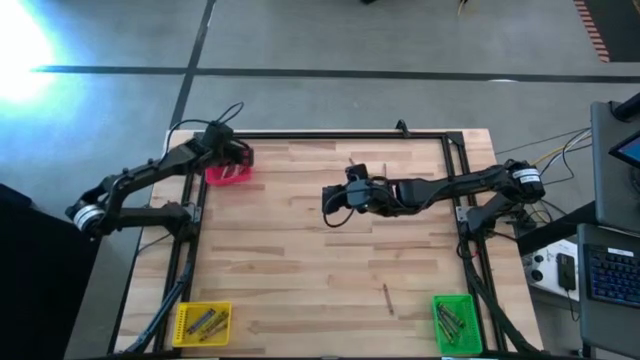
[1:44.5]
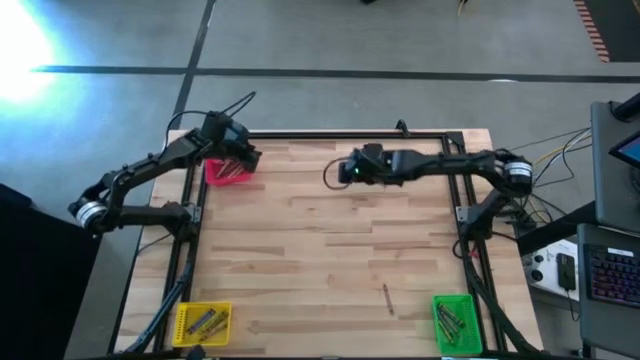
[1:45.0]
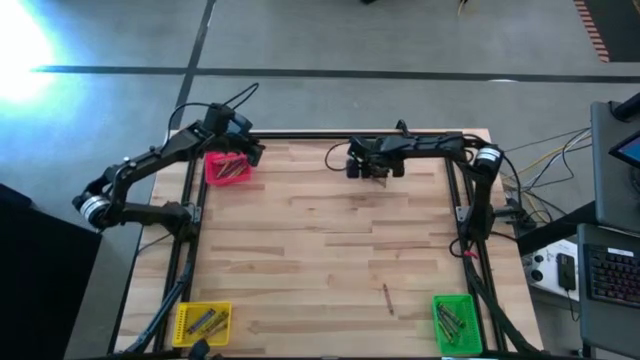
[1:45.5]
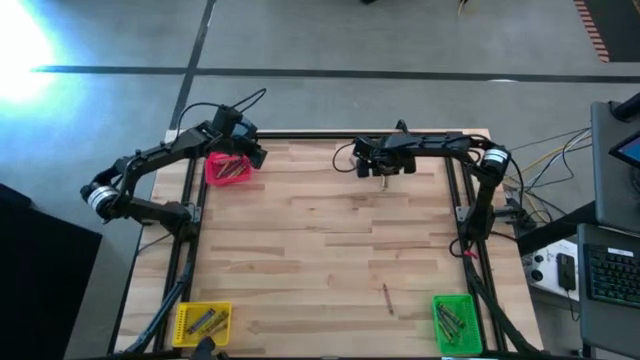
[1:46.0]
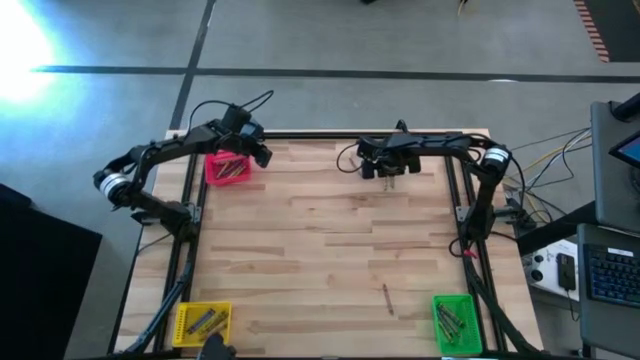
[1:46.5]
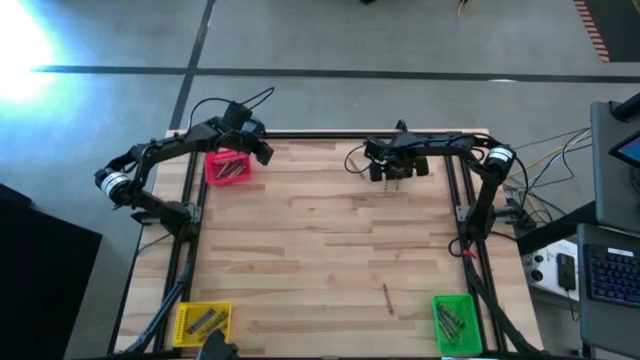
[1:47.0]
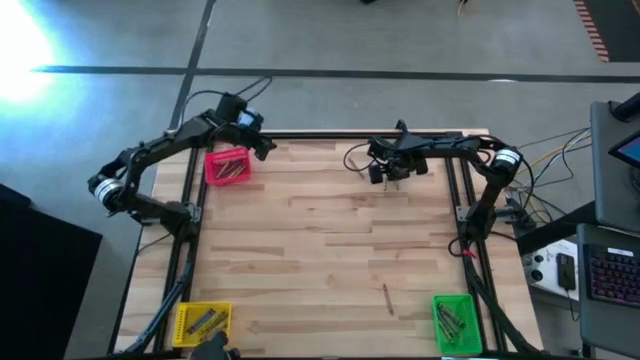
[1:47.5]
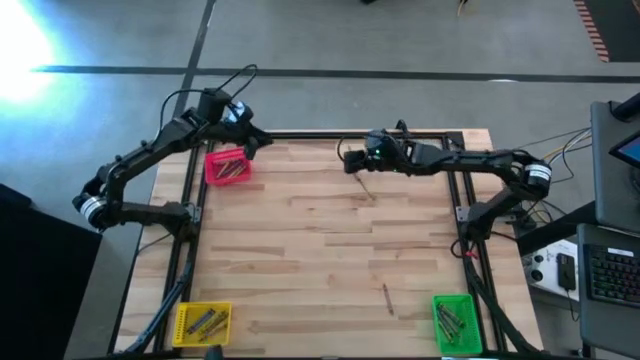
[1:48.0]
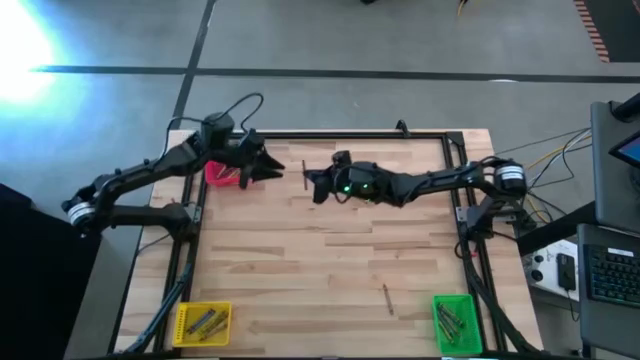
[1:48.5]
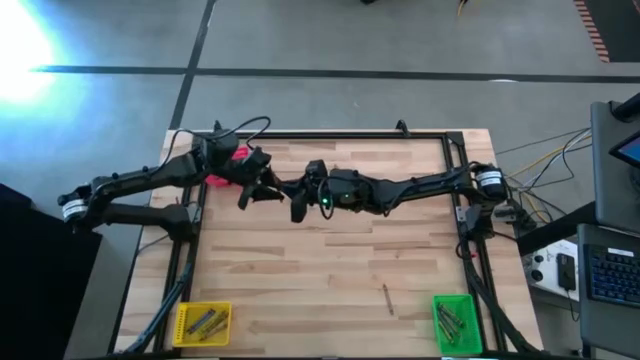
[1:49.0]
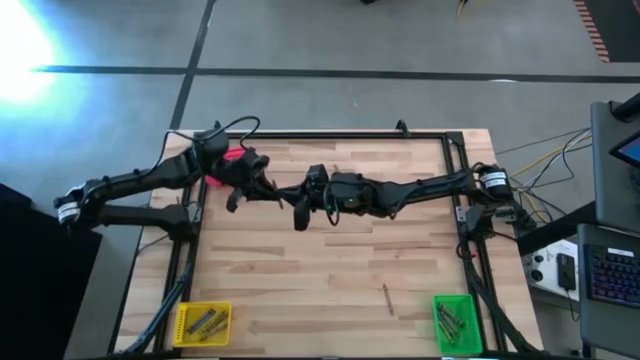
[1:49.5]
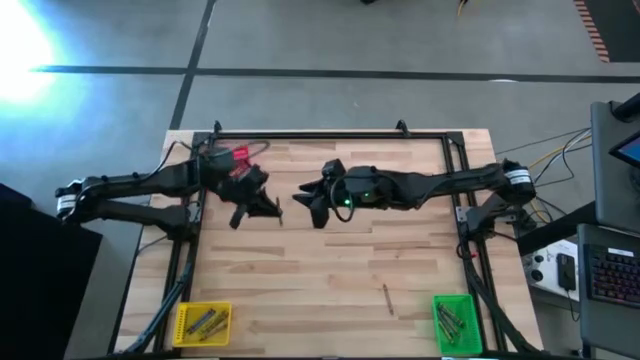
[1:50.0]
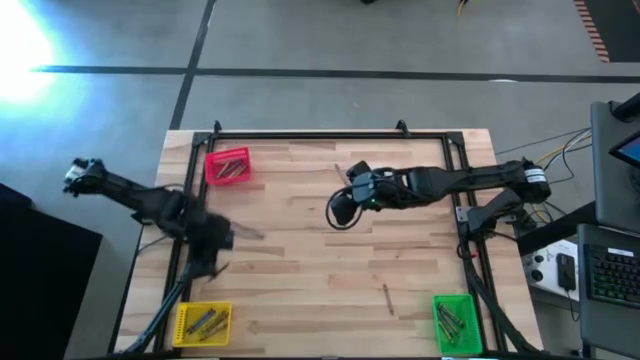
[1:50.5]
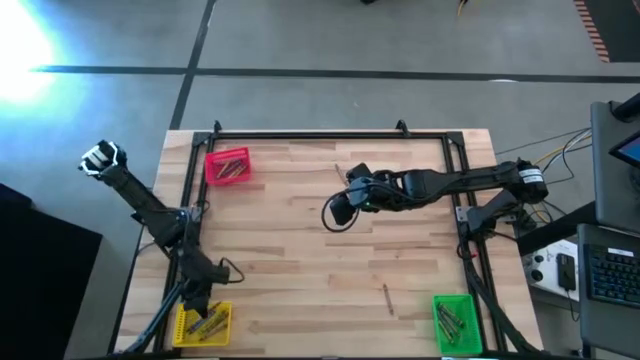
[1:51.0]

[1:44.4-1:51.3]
Task: Sort crayons
Put the brown crayon into the yellow bin

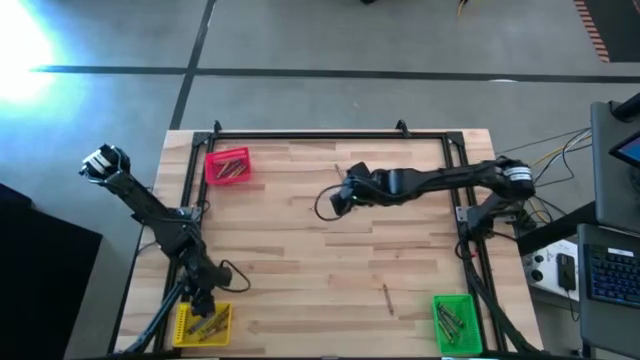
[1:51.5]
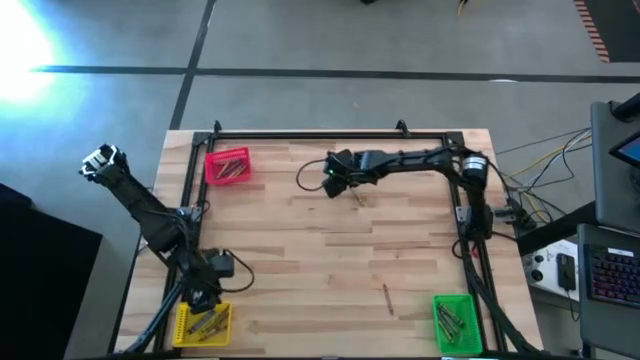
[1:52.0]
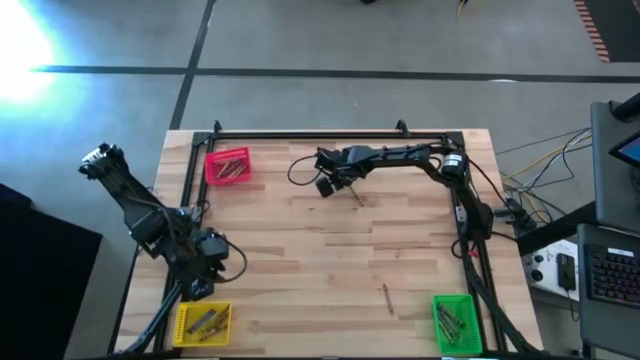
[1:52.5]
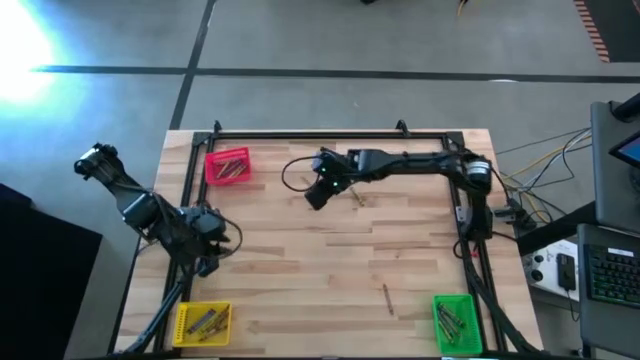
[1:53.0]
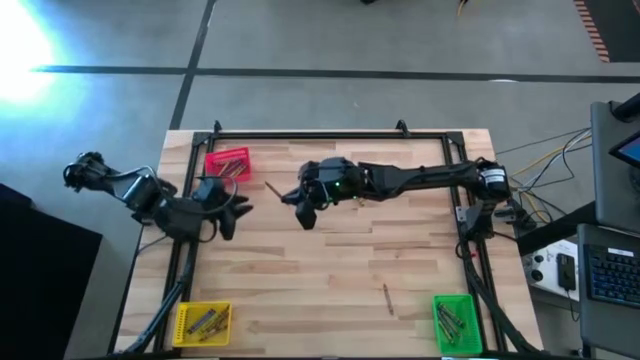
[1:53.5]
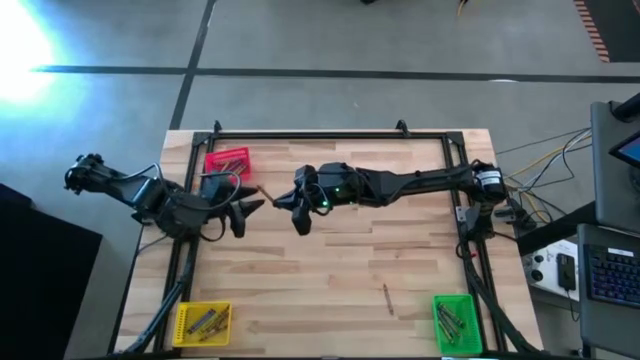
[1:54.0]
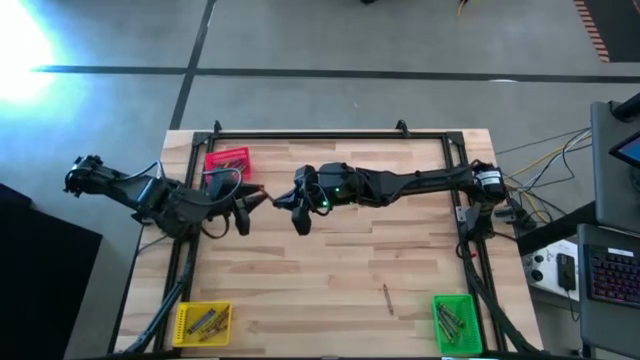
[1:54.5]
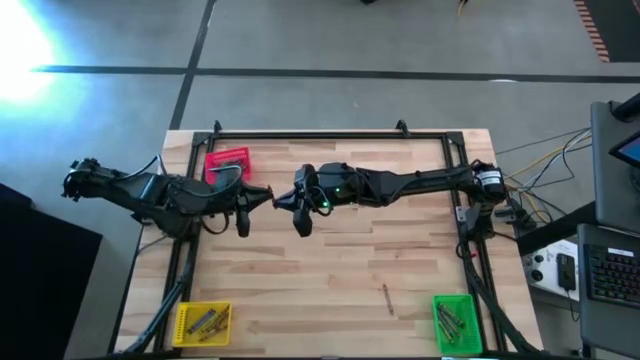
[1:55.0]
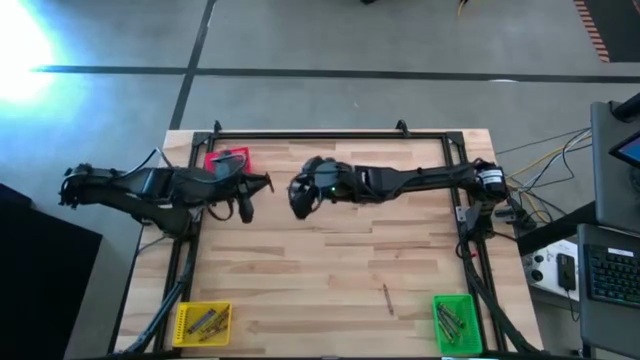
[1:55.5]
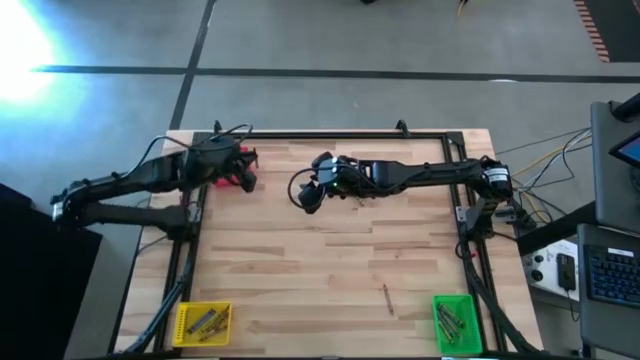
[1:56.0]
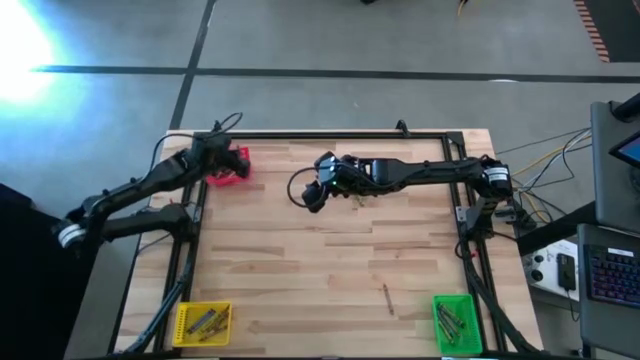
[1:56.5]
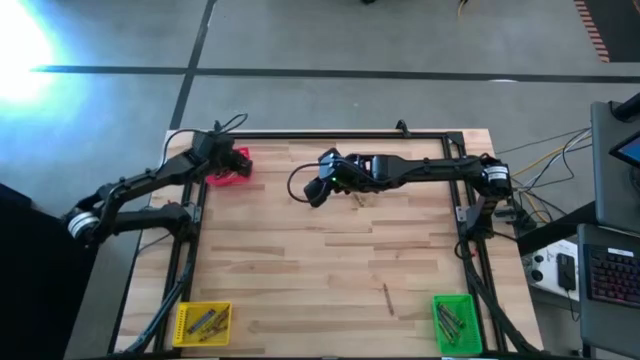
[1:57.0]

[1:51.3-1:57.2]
Put the brown crayon into the red bin

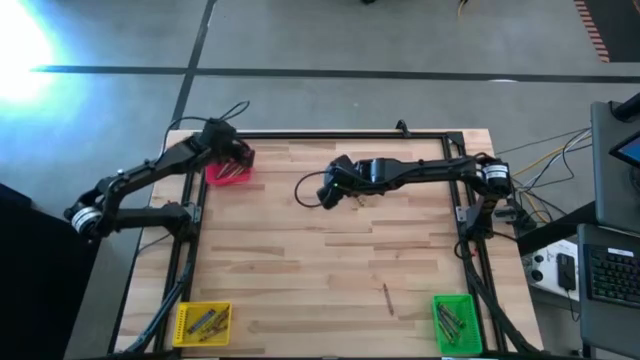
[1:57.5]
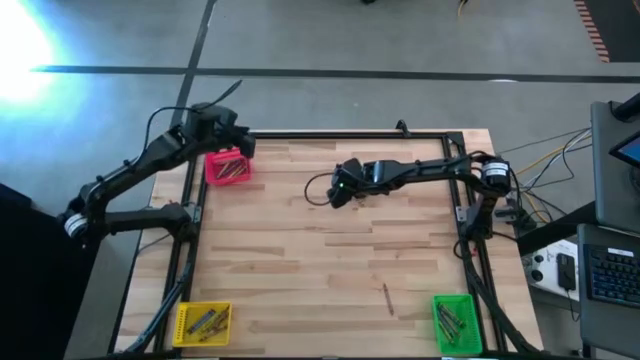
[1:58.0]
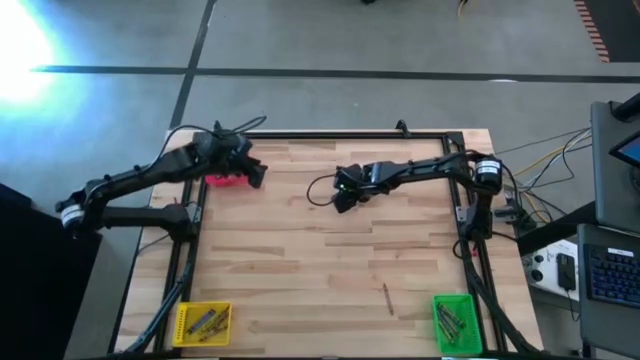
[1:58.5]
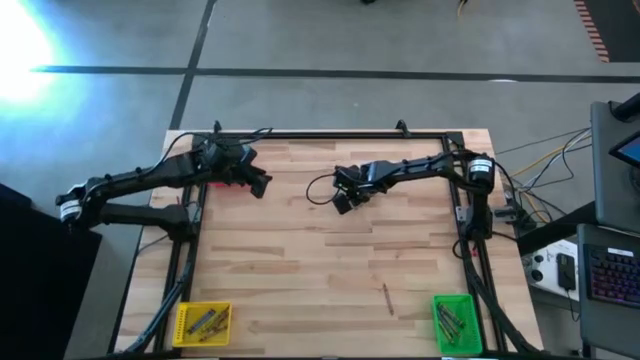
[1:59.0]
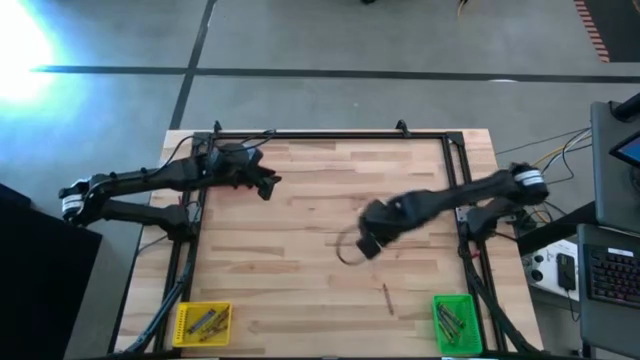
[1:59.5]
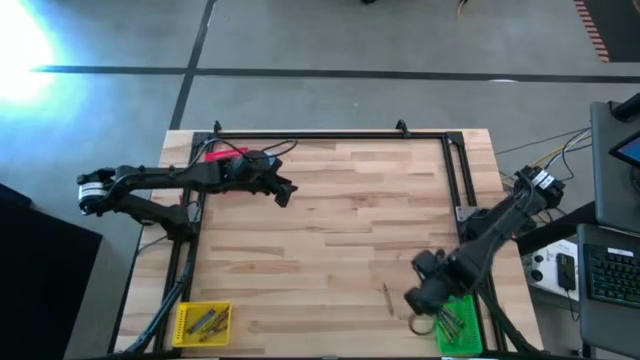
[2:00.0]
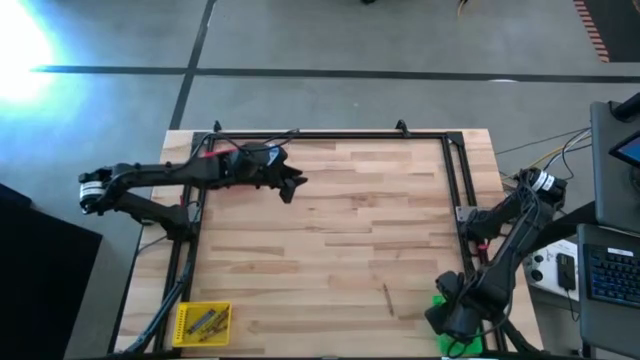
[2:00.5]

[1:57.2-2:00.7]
Put the green crayon into the green bin

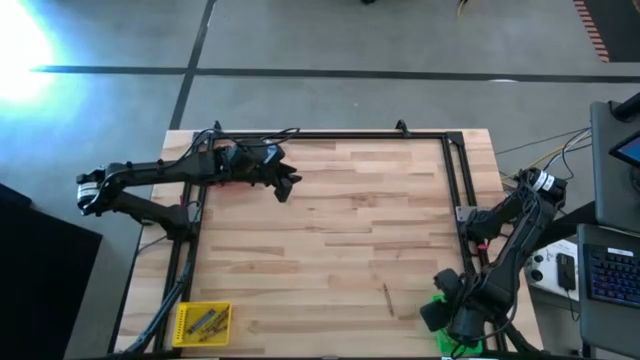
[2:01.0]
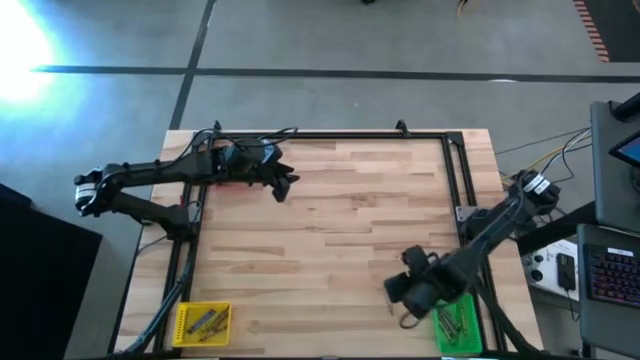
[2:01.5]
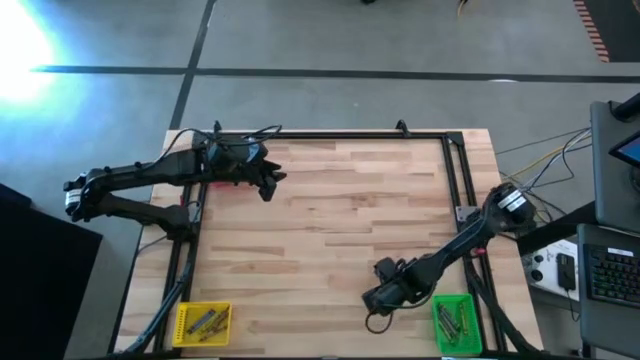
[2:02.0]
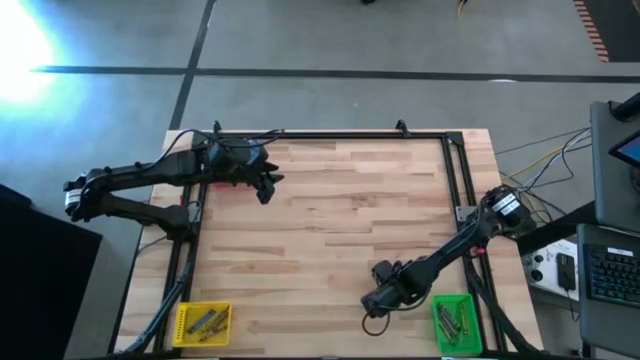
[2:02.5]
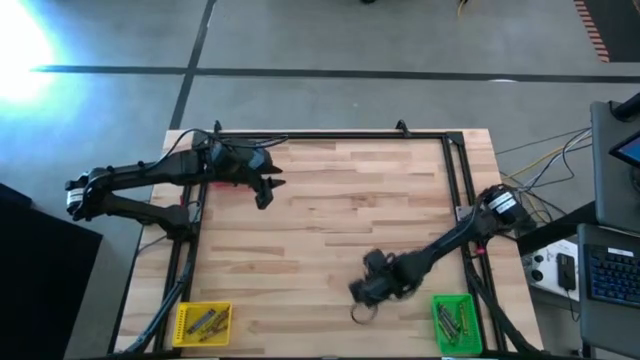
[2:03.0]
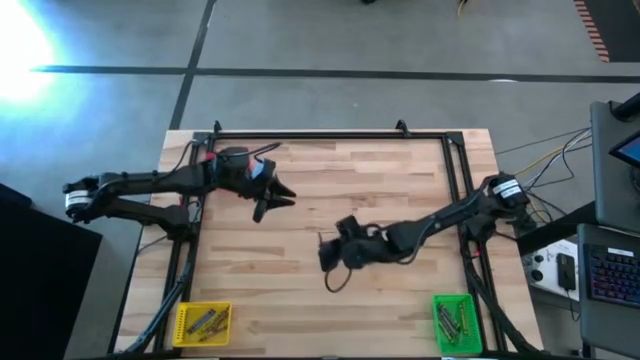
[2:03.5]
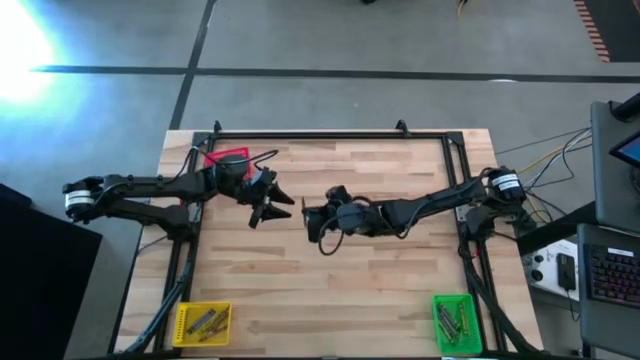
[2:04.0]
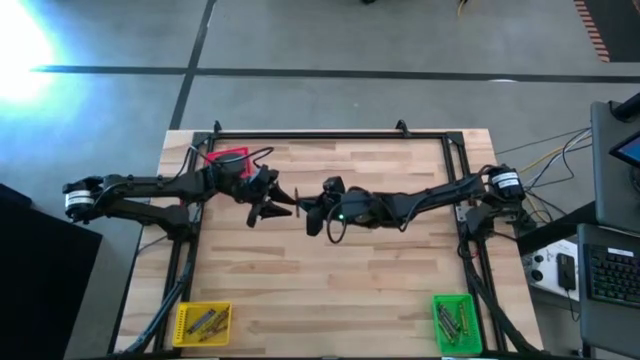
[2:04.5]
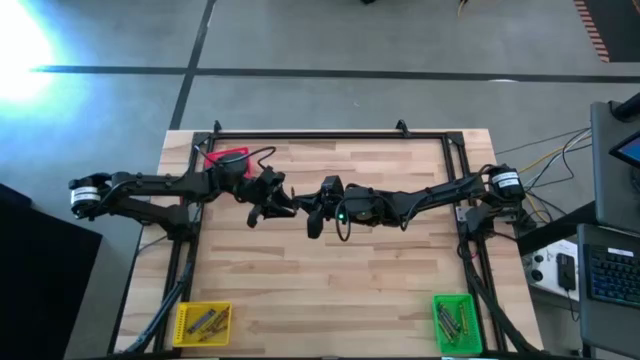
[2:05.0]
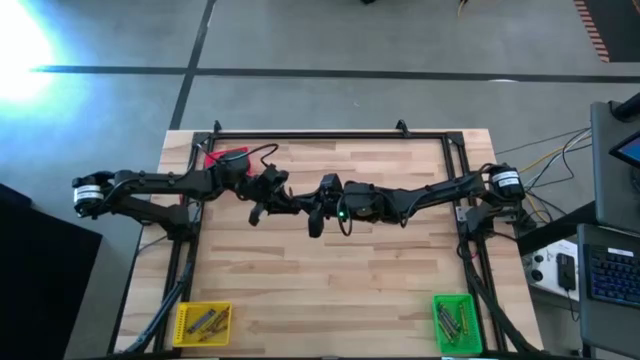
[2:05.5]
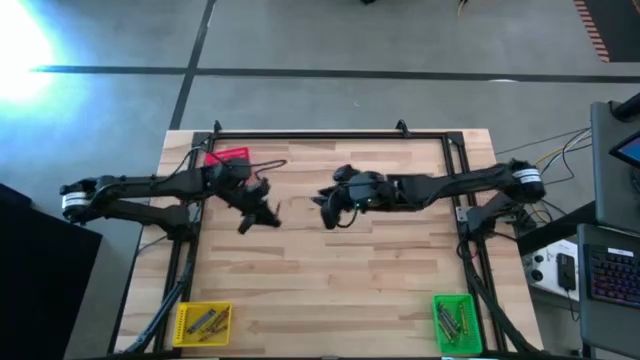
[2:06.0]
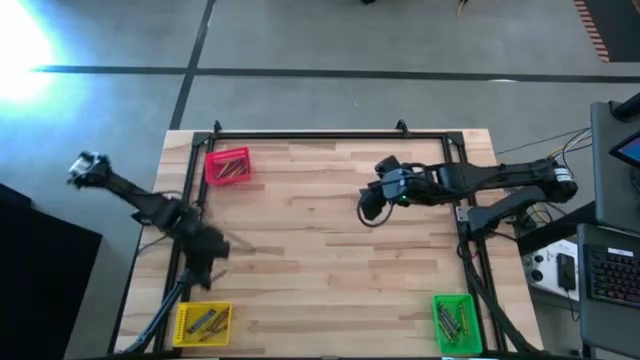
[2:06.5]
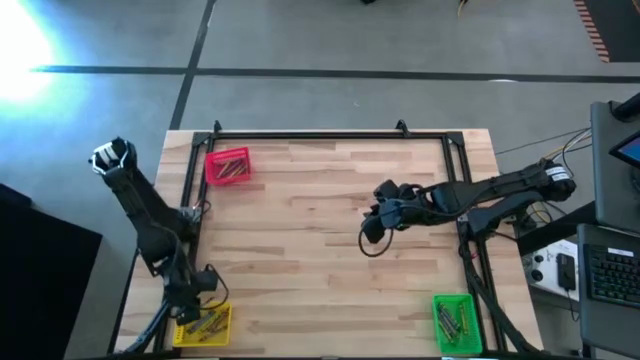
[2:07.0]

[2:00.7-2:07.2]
Put the brown crayon into the yellow bin
